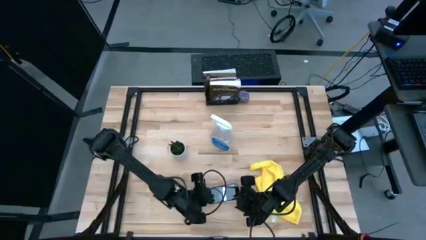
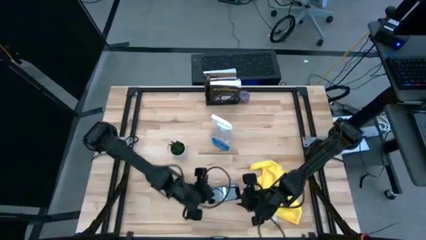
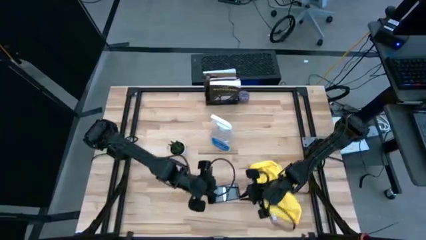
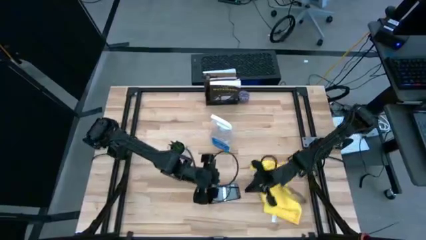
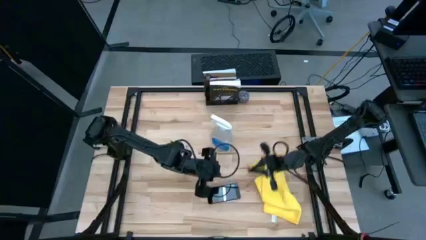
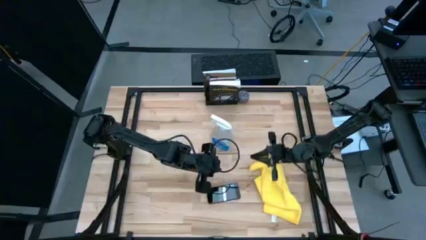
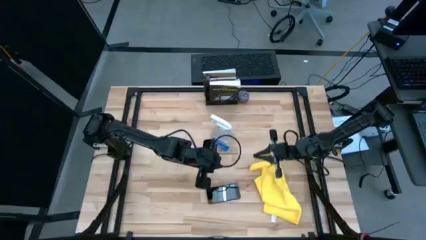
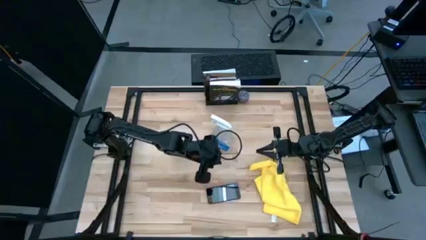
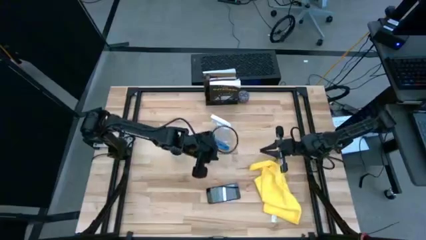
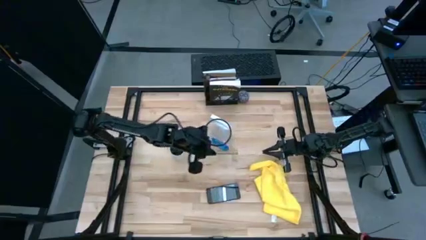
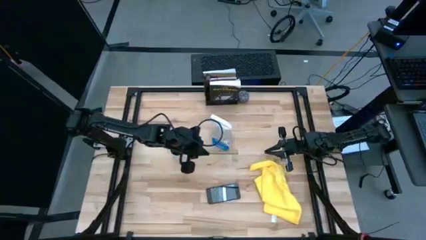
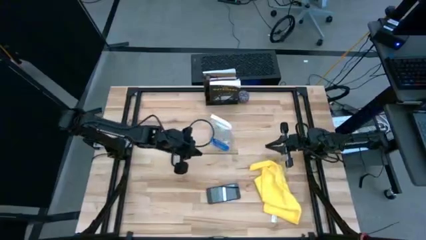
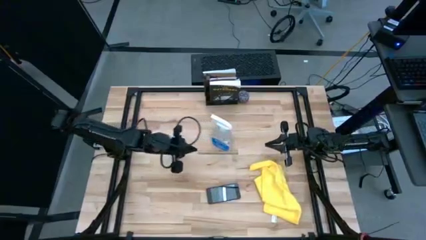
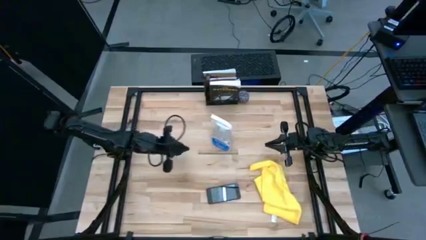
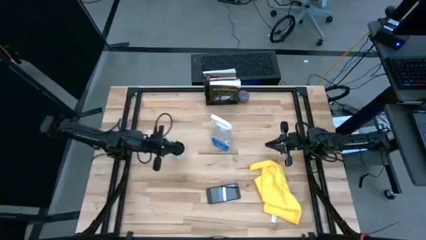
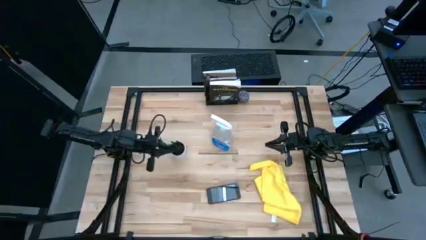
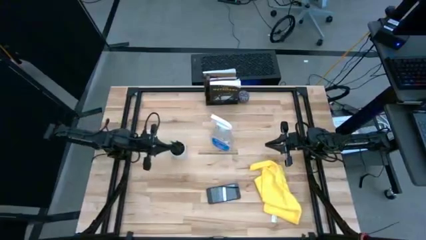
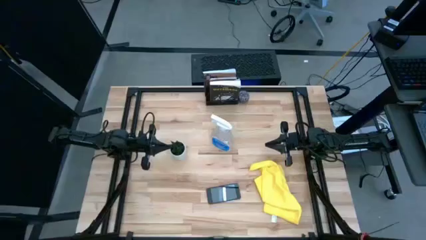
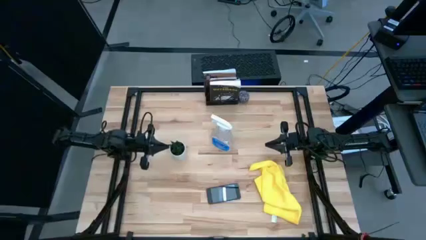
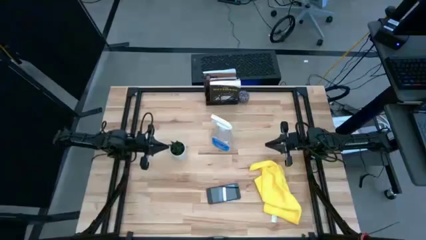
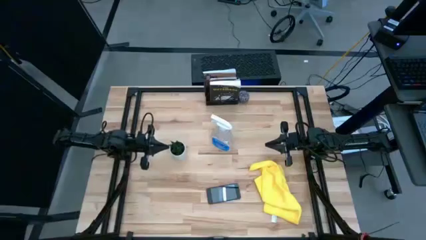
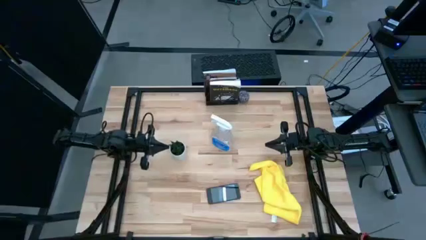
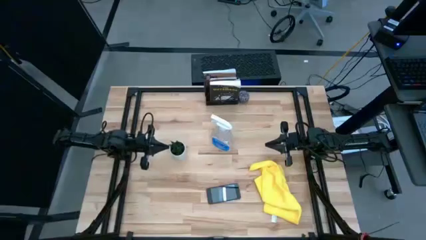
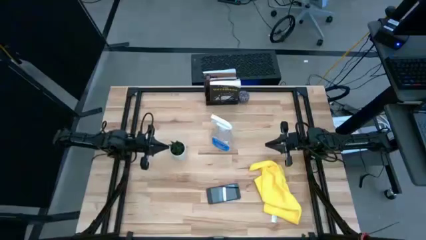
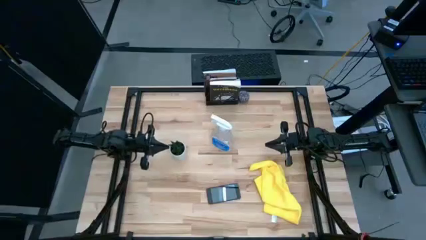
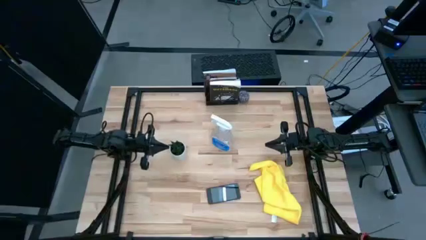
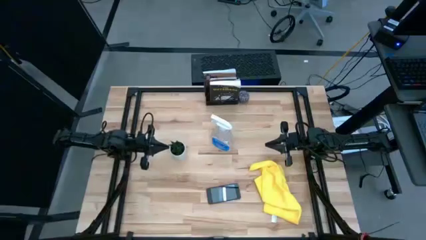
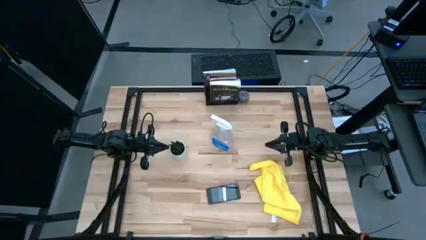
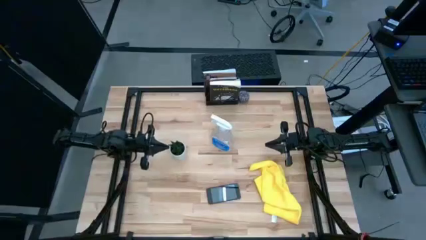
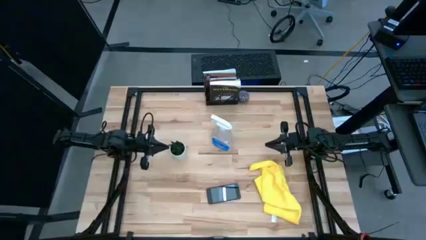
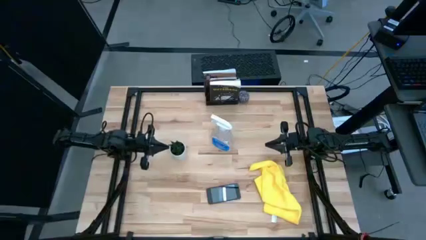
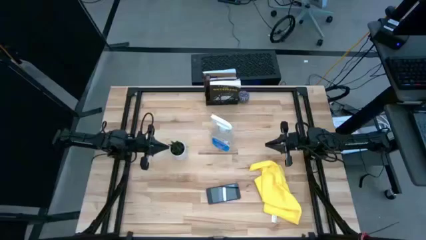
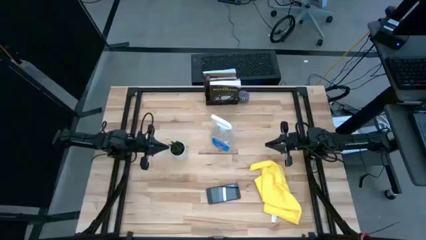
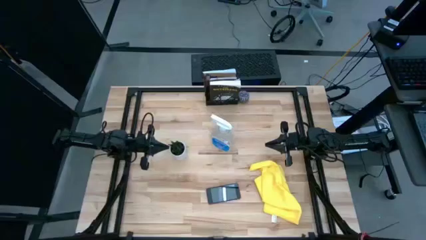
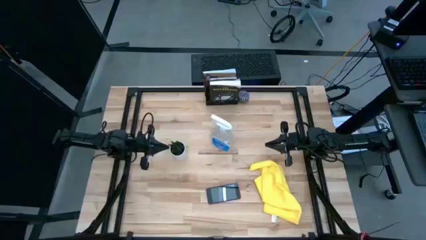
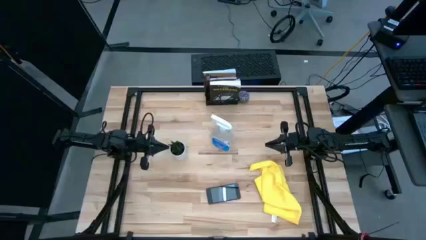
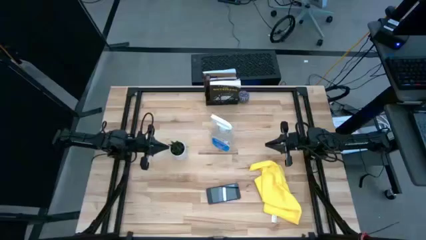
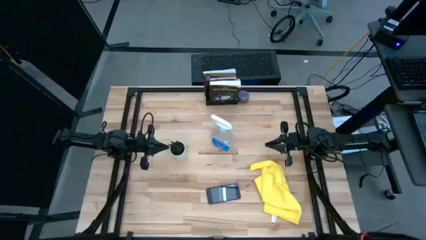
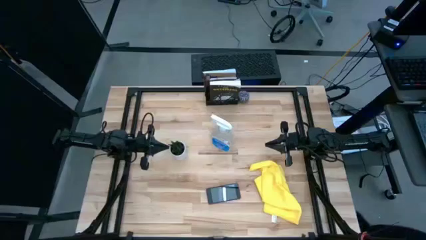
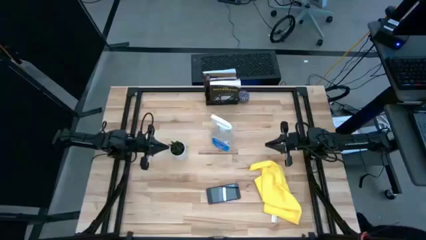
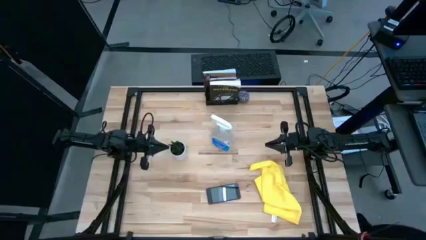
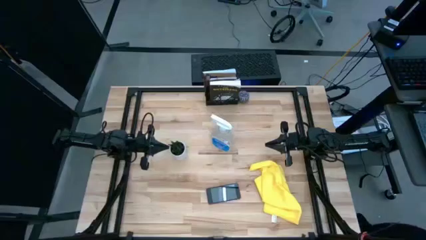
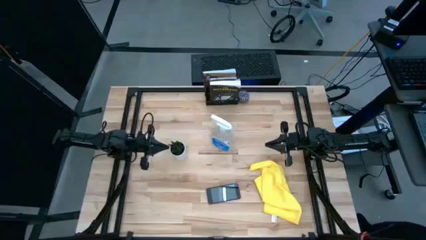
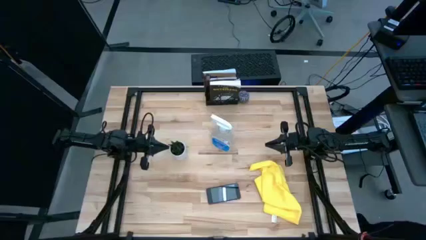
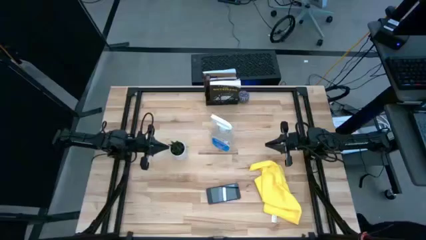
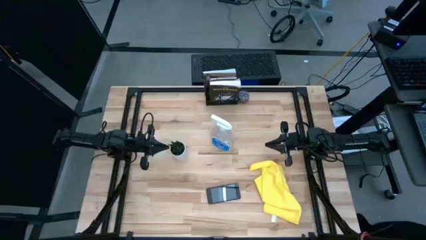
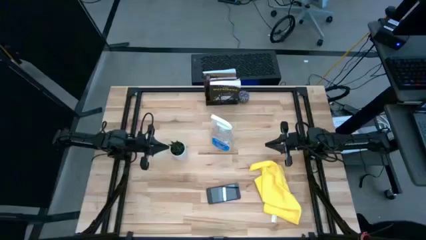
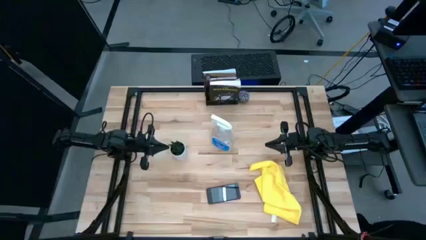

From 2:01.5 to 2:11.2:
Task: Apply microfiber cloth
Return to Home Position

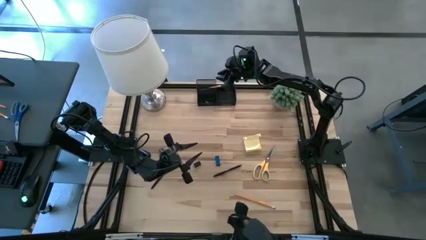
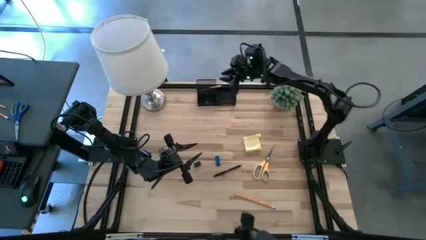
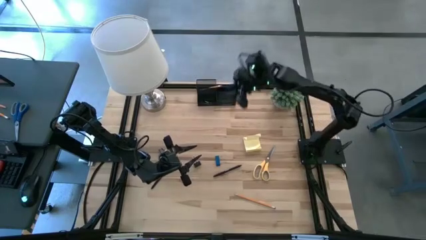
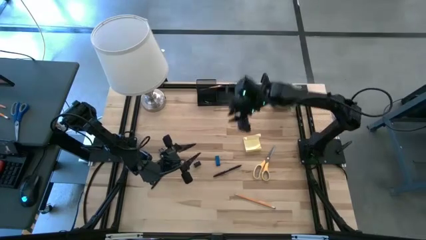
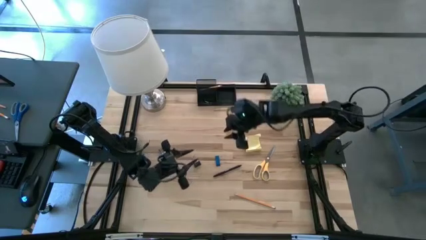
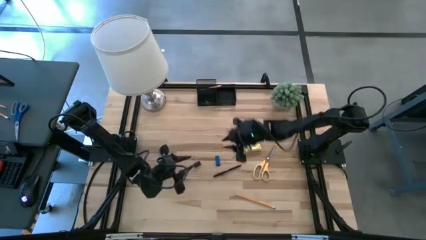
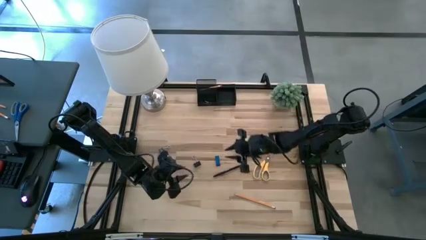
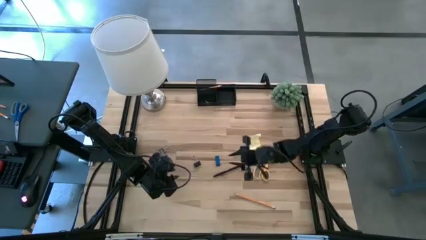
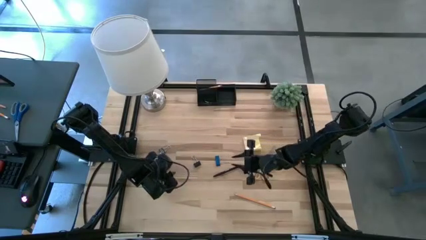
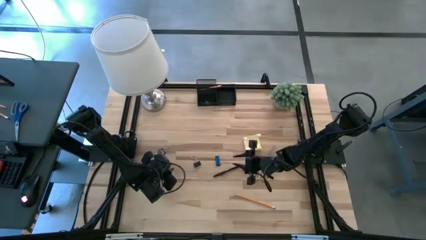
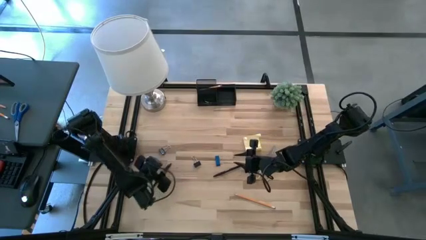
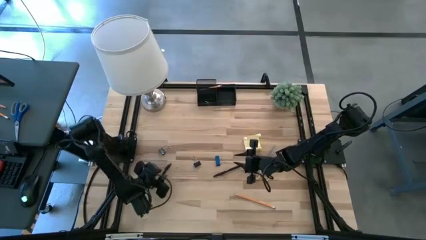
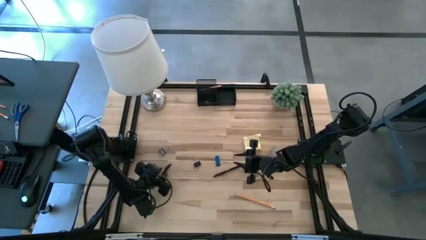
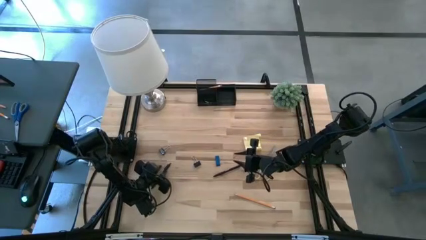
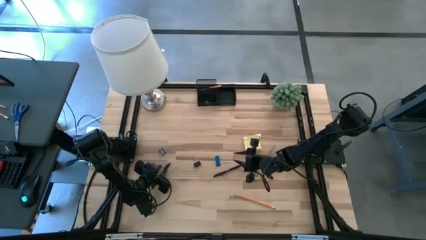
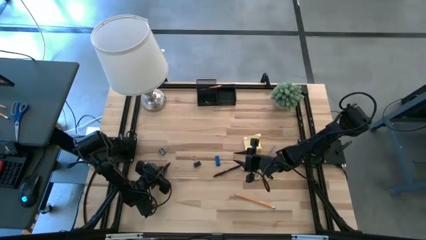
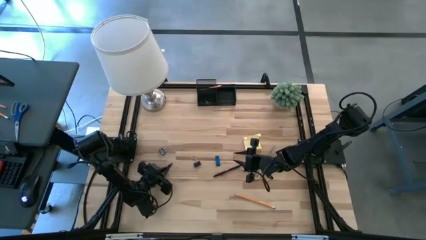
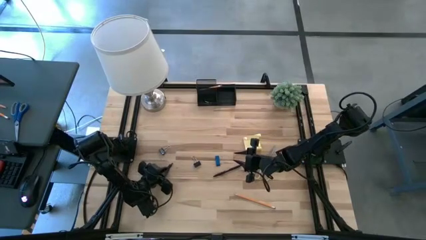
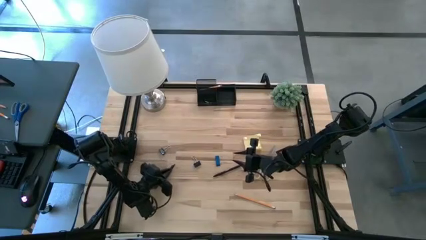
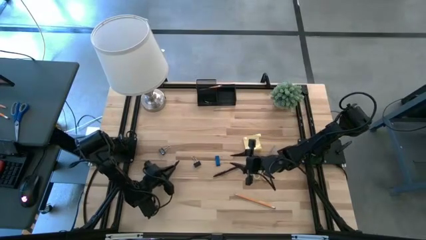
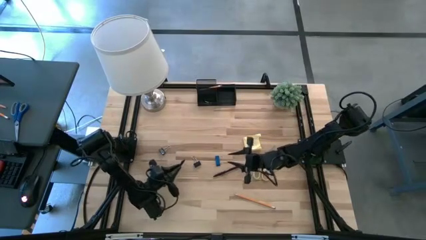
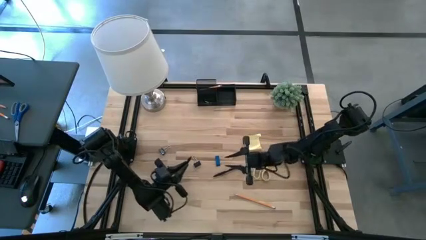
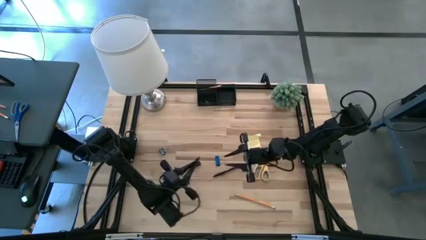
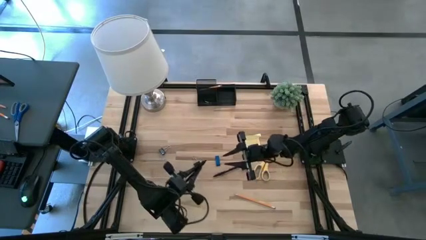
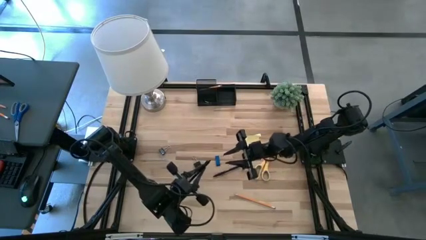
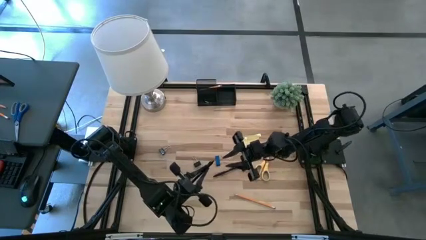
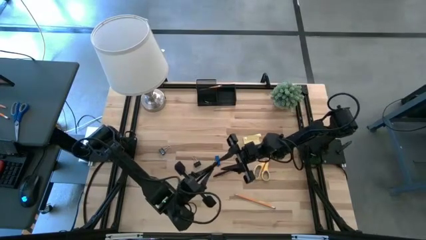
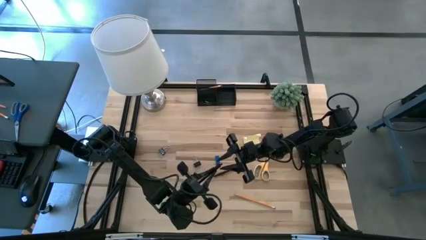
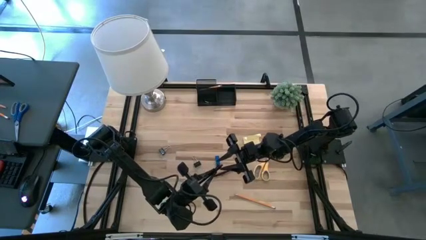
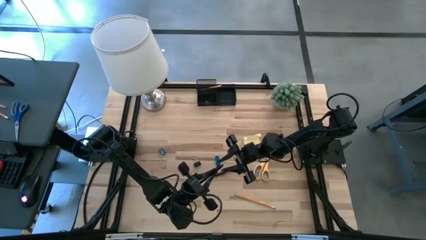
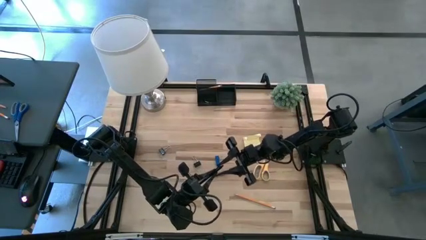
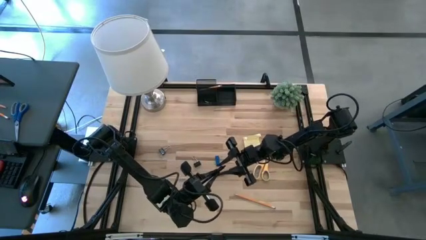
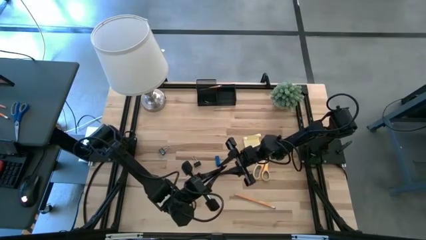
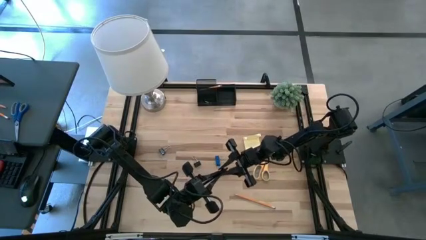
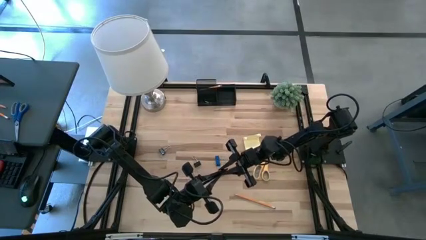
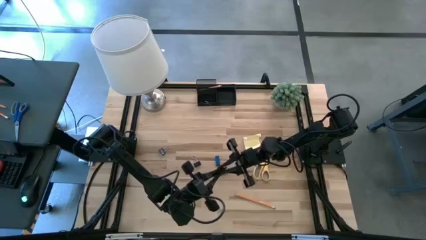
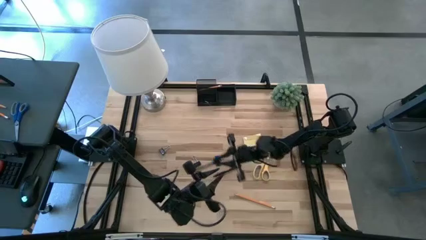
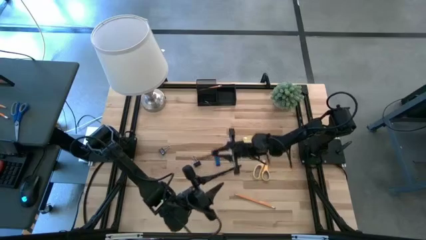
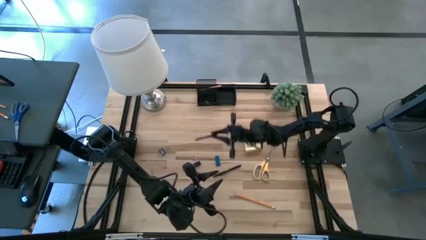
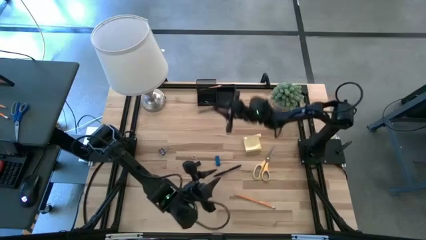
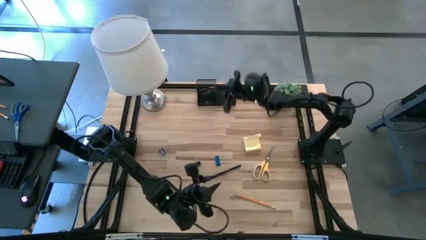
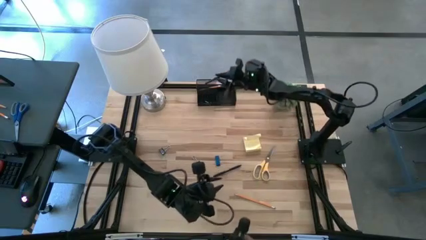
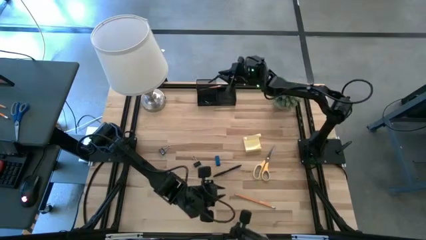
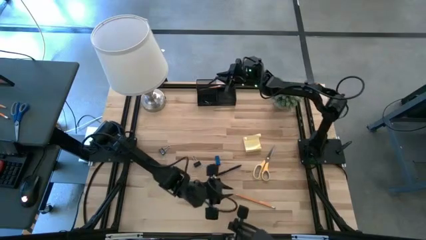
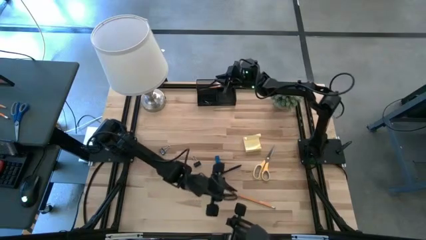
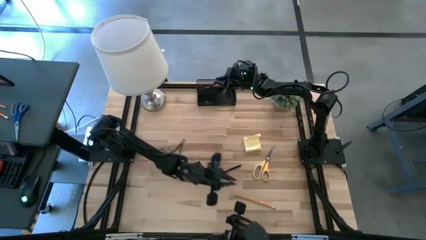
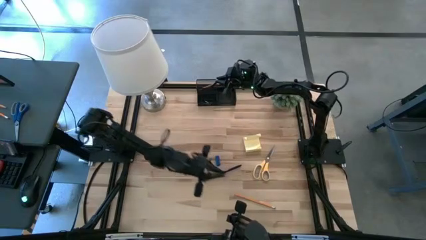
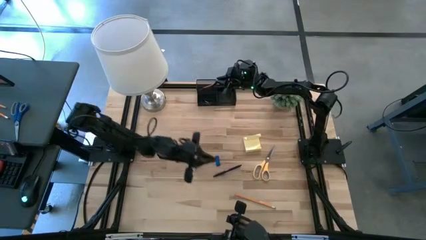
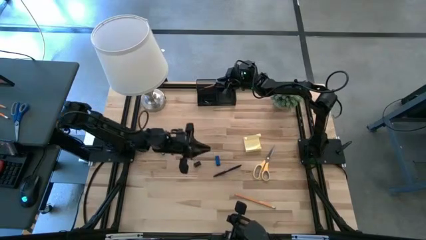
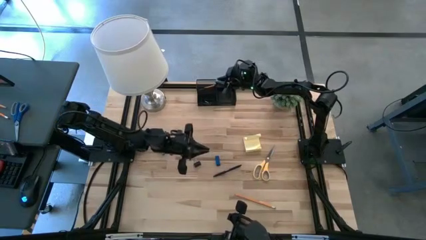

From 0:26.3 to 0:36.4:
Task: Pick and place office supplies into organizer
Put the left black pen into the black desk organizer
